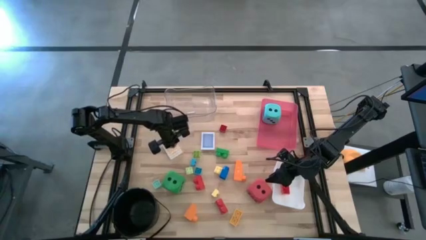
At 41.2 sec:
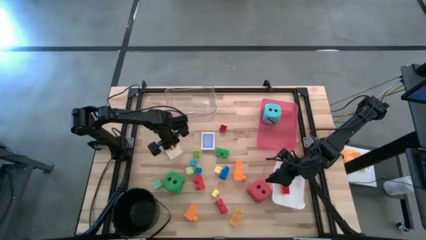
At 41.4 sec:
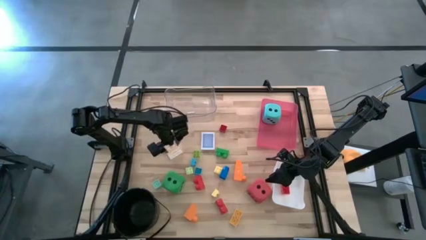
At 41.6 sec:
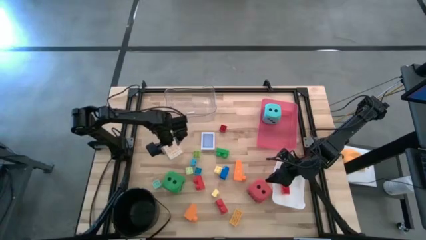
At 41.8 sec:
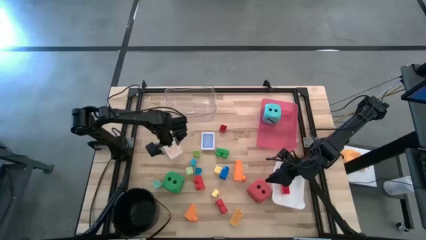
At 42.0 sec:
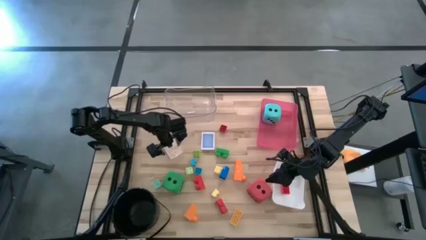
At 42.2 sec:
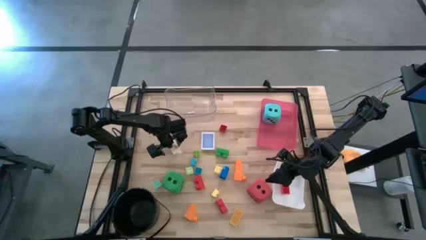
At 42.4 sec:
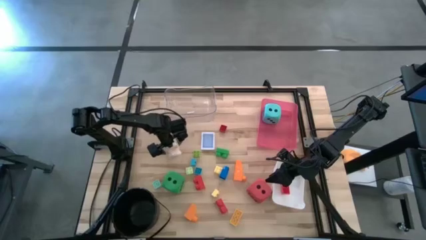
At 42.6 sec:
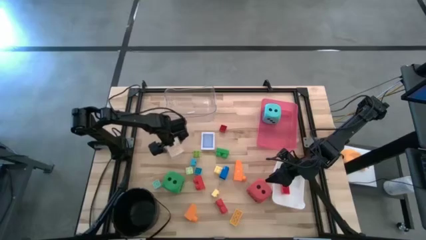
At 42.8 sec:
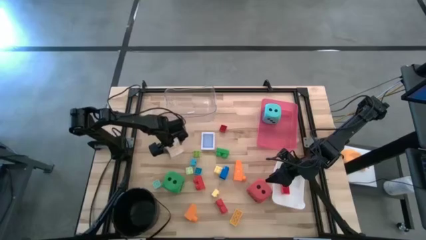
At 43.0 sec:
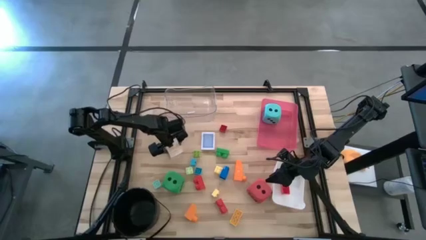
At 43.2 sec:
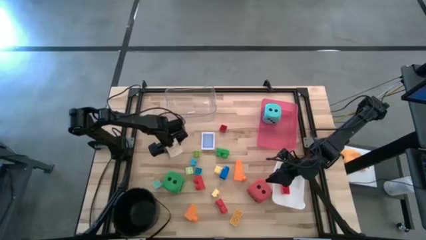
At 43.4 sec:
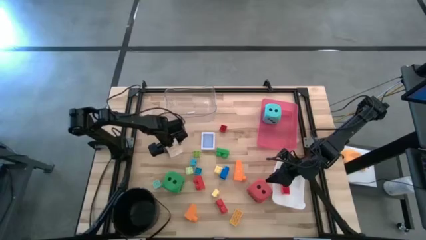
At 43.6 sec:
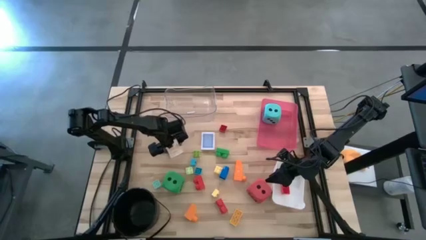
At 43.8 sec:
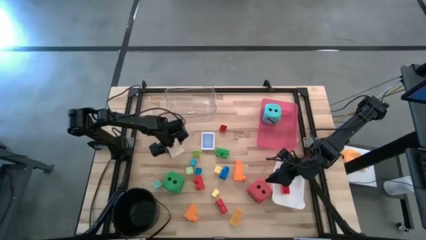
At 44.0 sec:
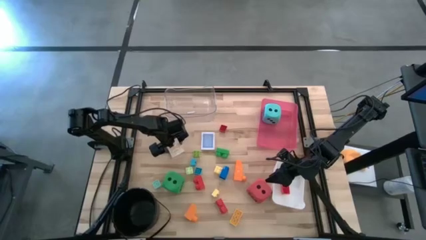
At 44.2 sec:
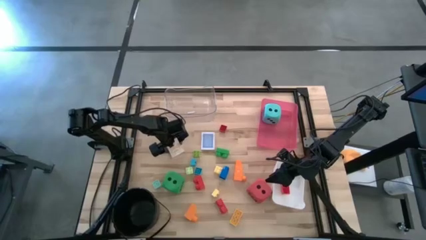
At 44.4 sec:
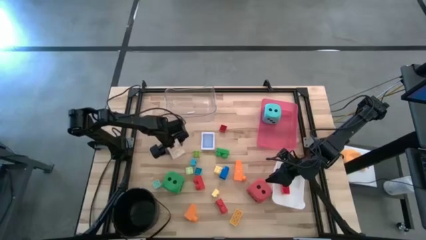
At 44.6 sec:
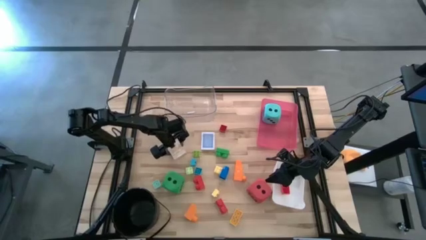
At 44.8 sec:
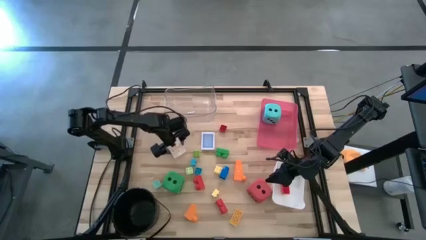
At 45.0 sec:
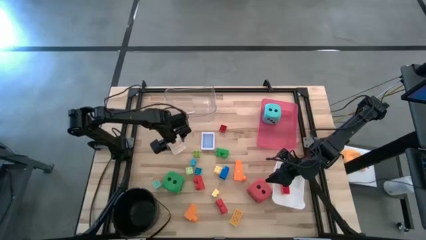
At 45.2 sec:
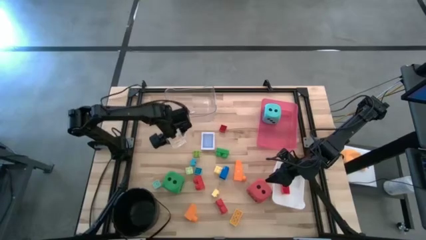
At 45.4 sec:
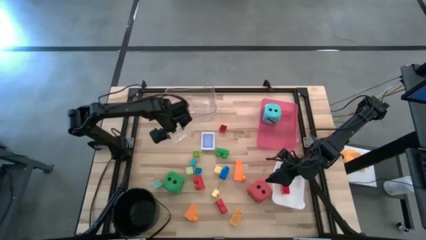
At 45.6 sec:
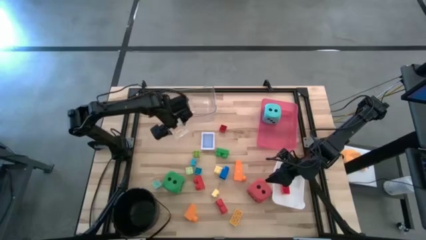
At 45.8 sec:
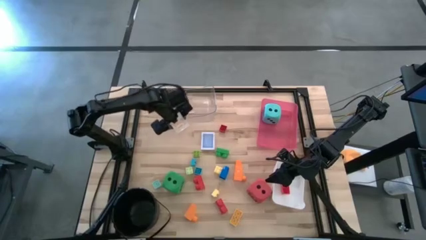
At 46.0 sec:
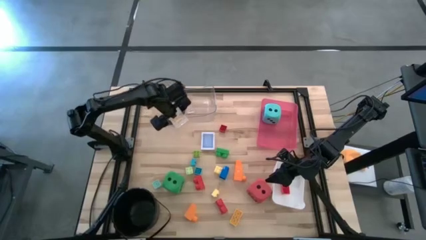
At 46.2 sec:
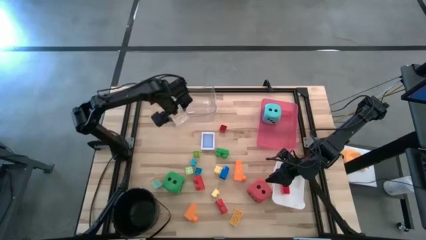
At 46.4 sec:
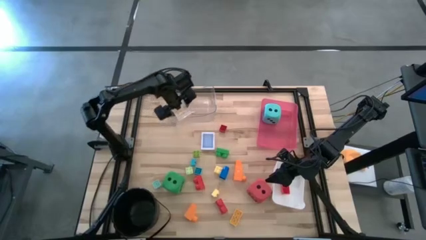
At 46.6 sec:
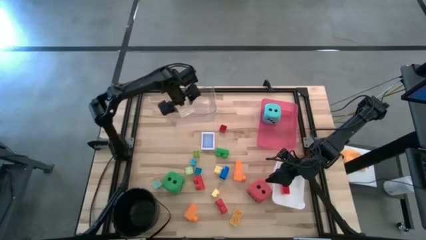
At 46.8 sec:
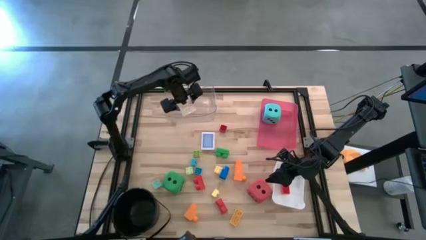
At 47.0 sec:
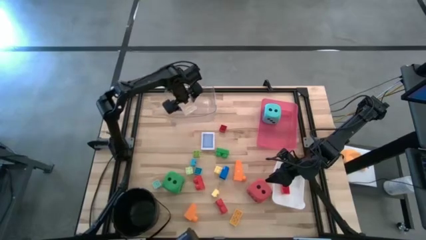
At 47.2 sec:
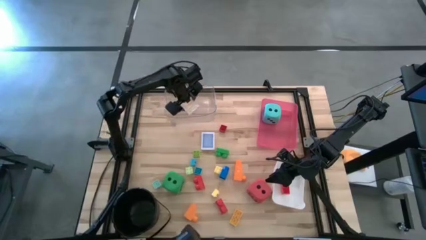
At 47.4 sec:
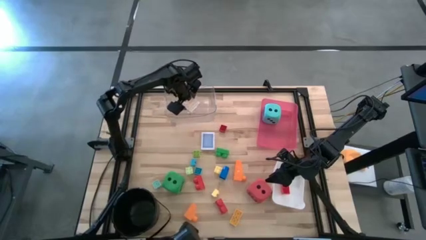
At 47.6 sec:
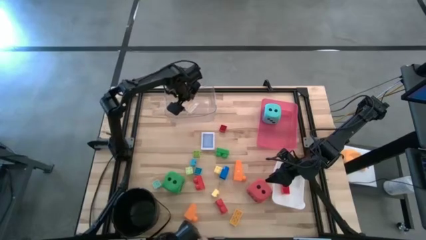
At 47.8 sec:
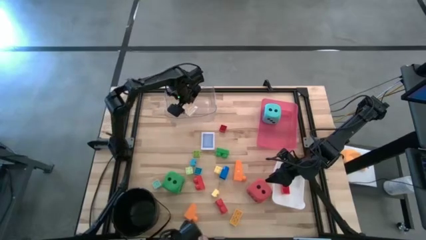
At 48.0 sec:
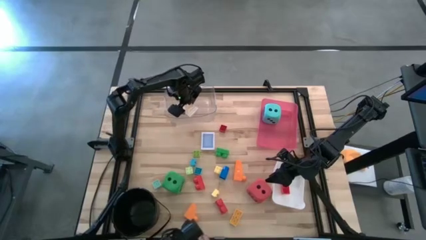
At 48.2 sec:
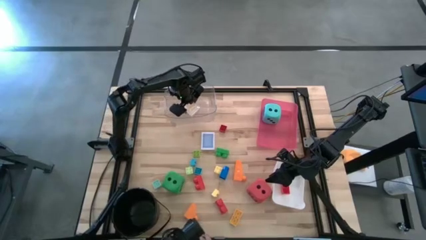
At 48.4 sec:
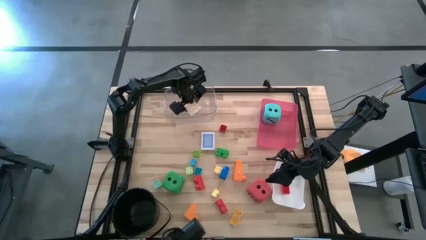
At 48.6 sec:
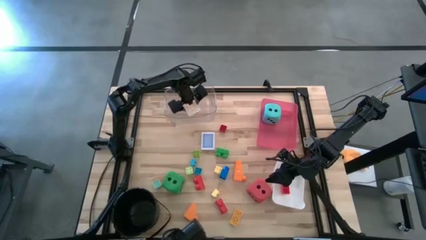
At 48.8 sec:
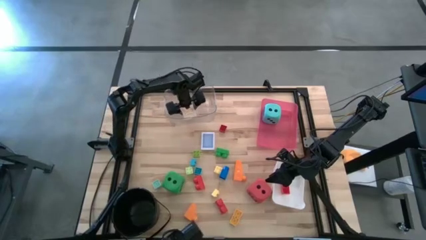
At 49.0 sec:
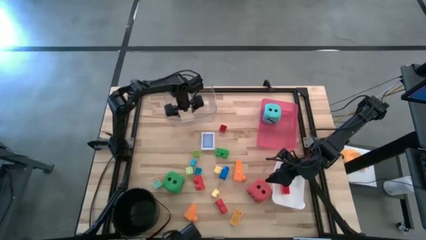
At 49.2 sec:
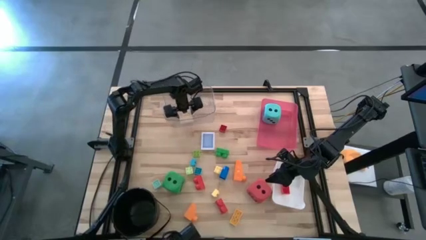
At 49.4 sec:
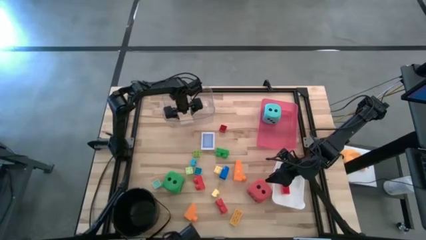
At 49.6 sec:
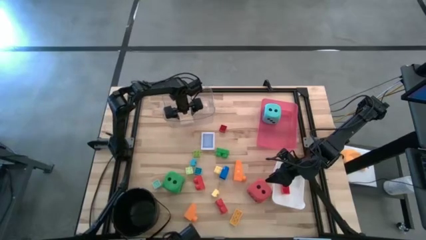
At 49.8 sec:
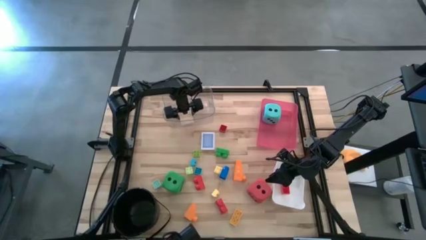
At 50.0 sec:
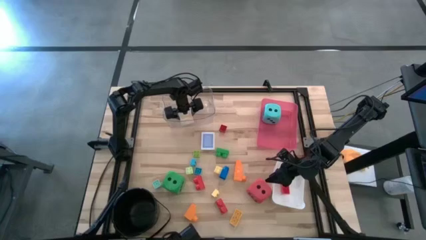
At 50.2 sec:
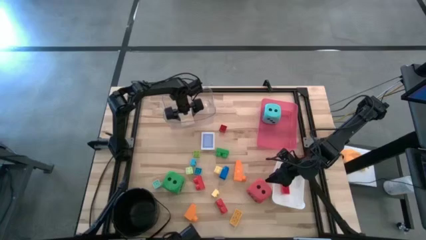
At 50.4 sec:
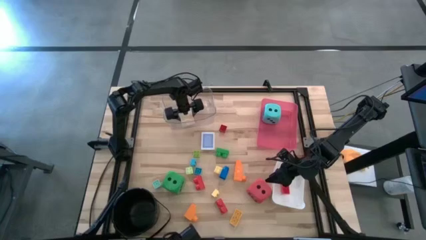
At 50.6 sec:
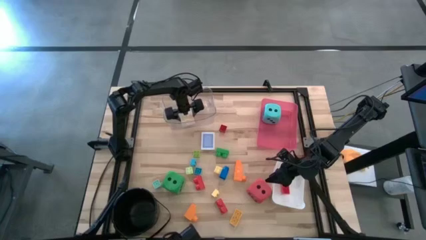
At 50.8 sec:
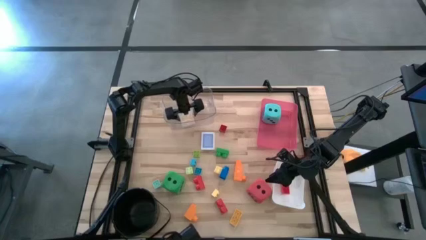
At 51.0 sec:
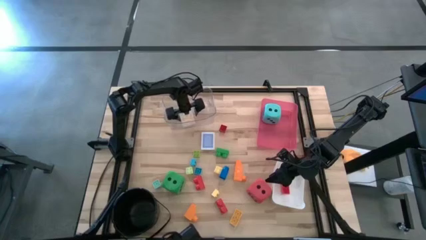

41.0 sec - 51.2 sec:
Task: Pick & Place Toys
Put the orange deck of cards box into the transparent bin
